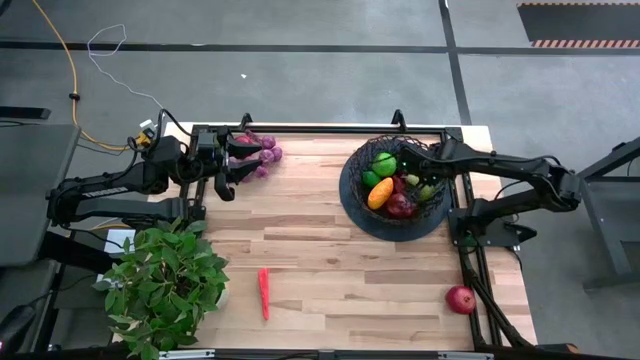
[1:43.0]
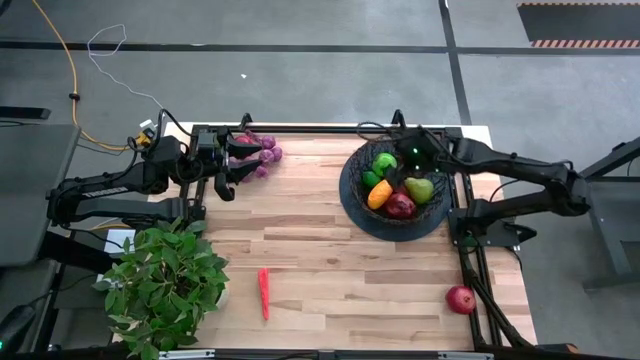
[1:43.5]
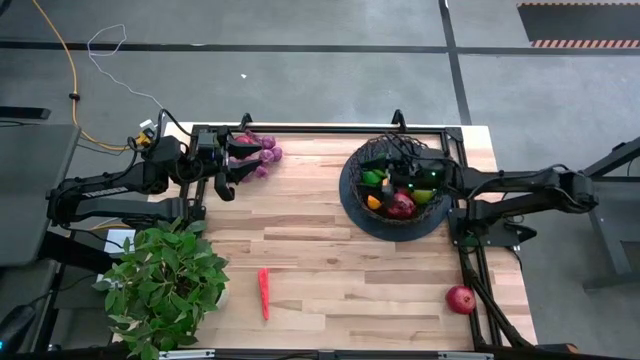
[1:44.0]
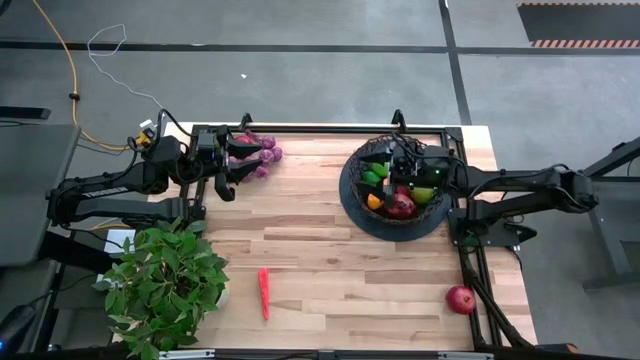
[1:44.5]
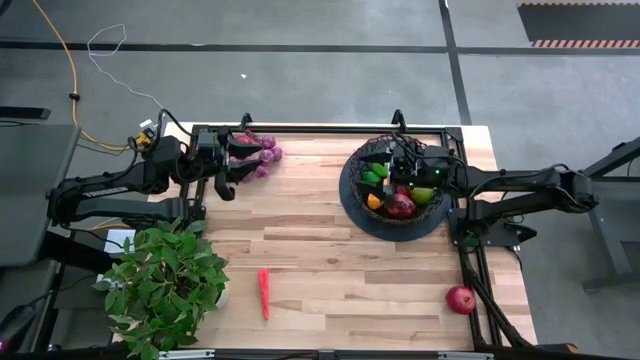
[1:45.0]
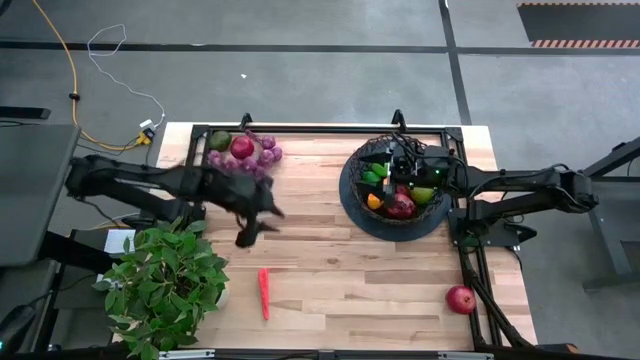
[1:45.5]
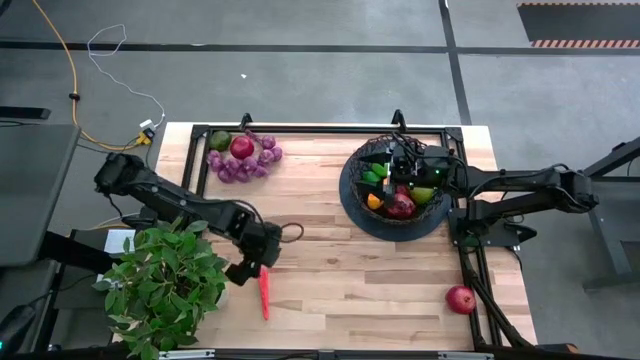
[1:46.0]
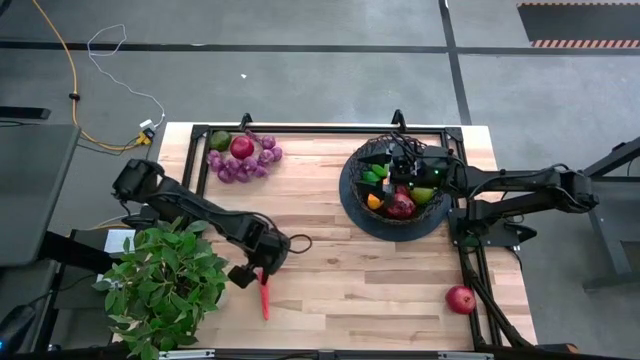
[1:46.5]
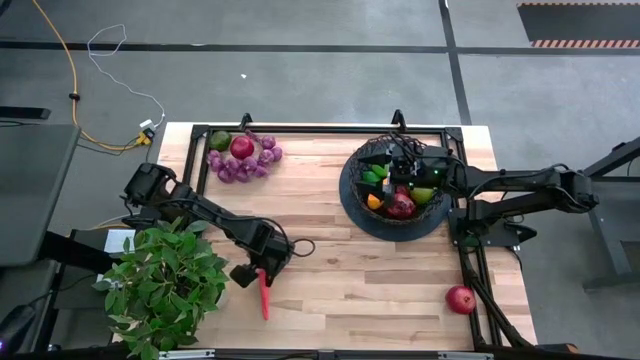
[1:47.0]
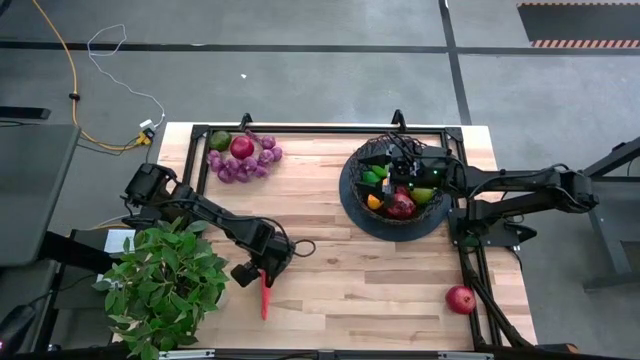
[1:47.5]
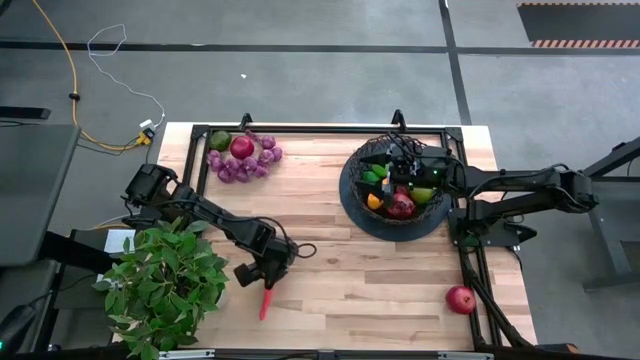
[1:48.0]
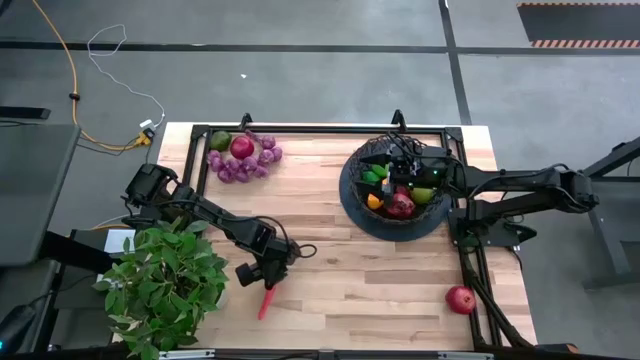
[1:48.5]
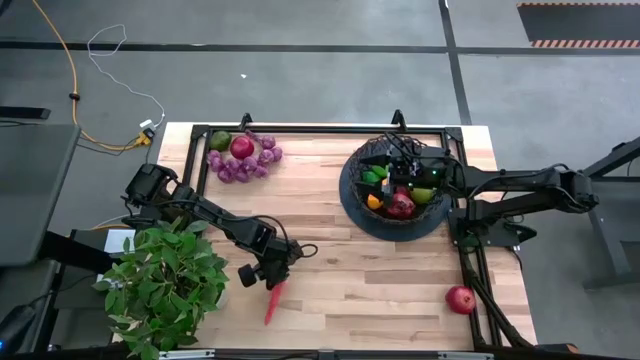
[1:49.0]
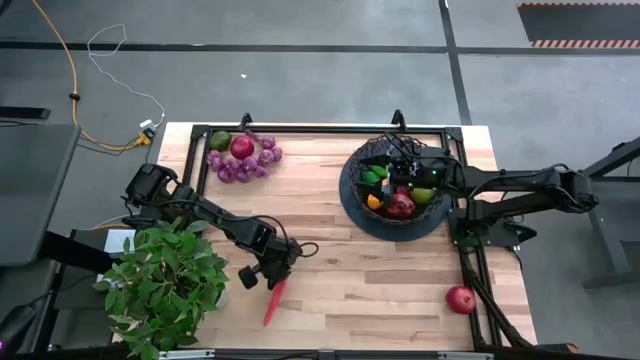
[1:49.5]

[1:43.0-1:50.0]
Task: Build produce basket
Put the orange chili pepper into the black wire basket

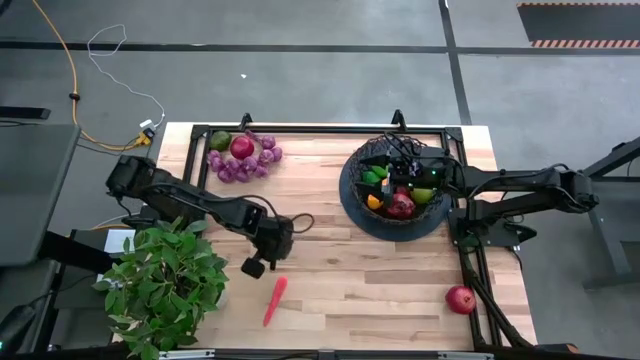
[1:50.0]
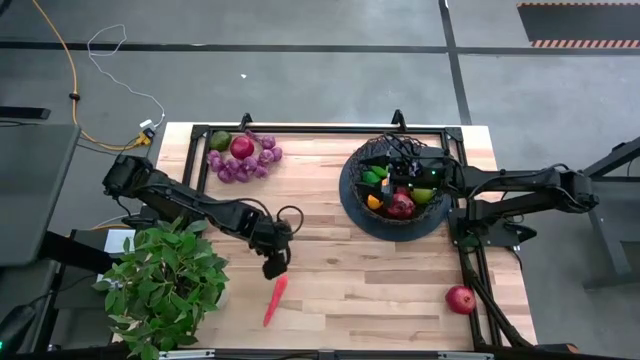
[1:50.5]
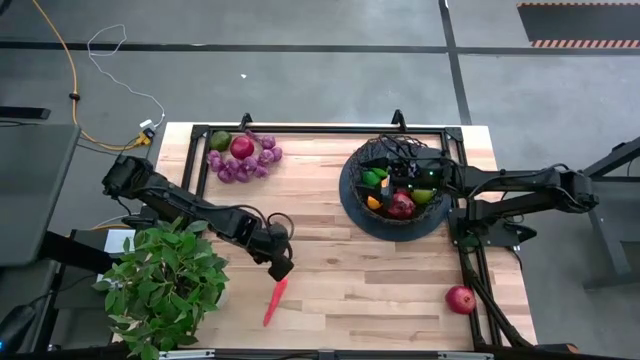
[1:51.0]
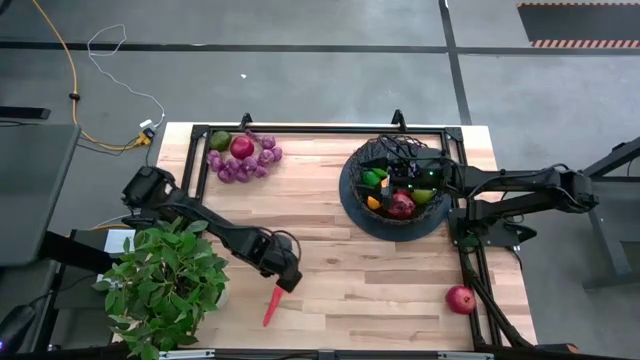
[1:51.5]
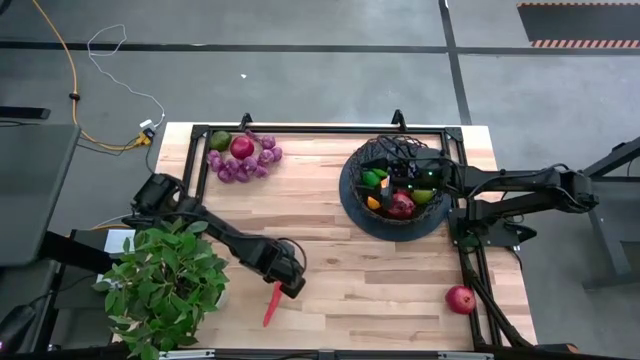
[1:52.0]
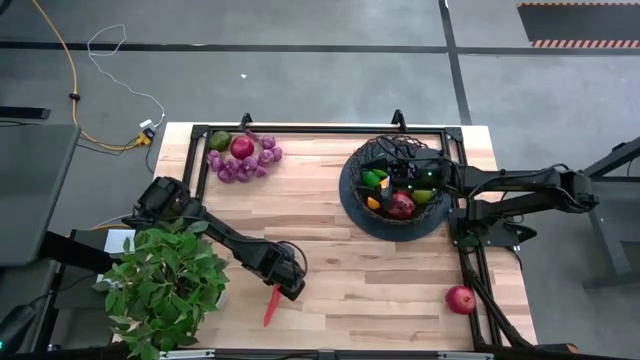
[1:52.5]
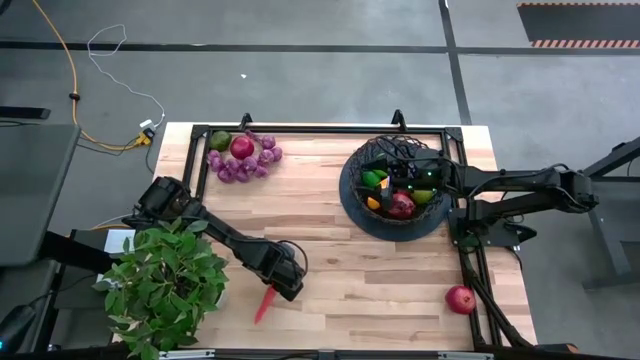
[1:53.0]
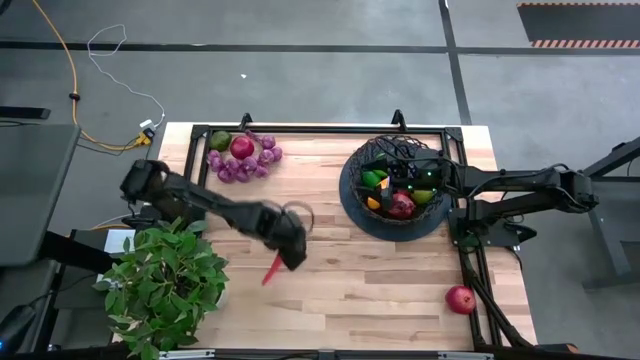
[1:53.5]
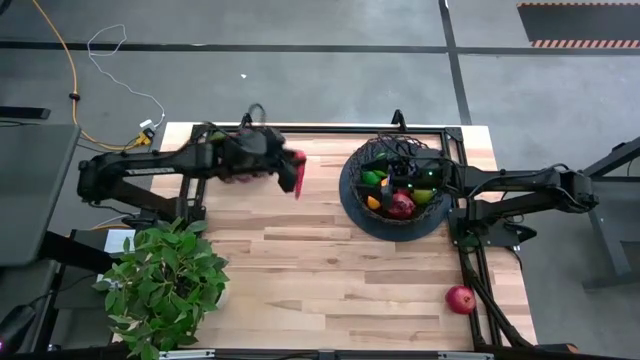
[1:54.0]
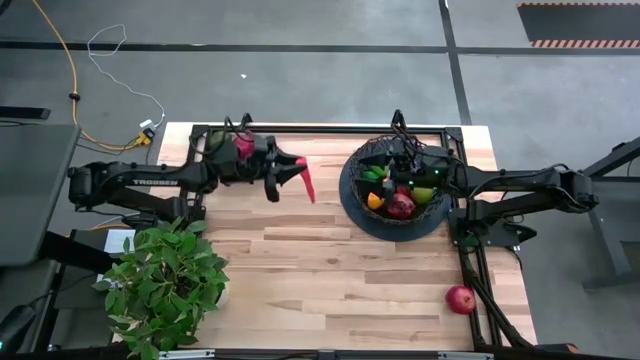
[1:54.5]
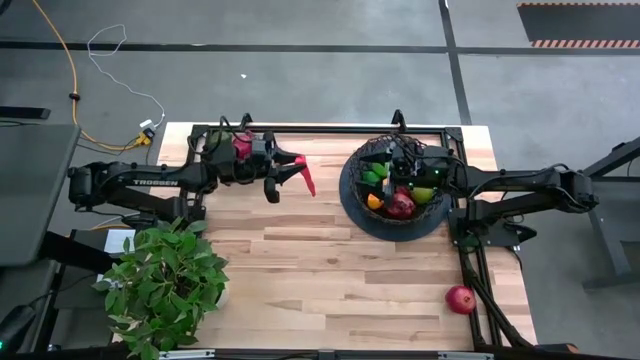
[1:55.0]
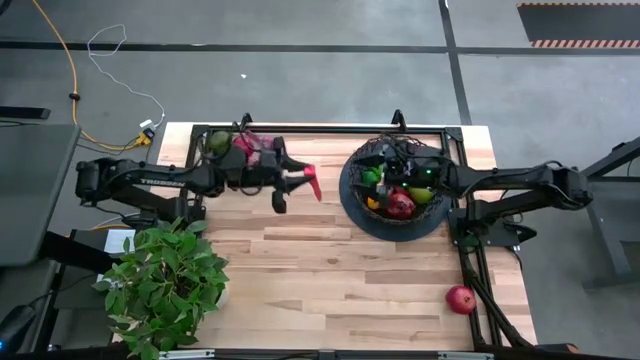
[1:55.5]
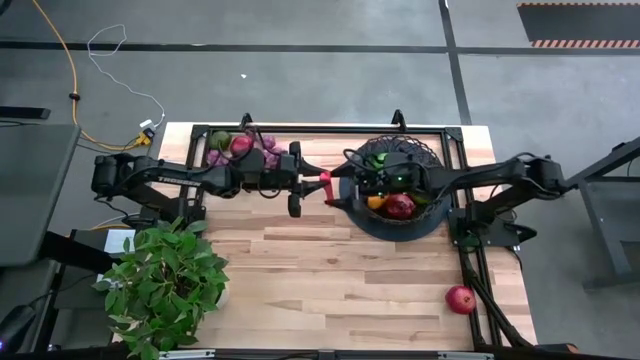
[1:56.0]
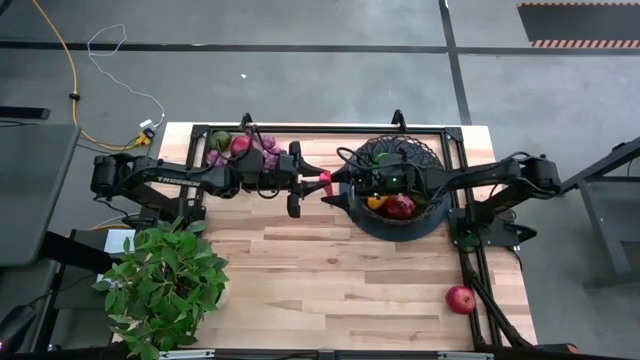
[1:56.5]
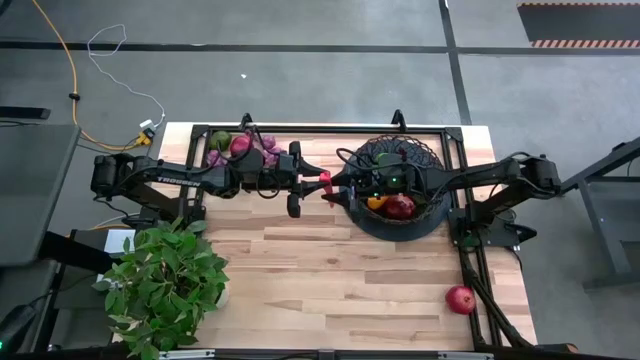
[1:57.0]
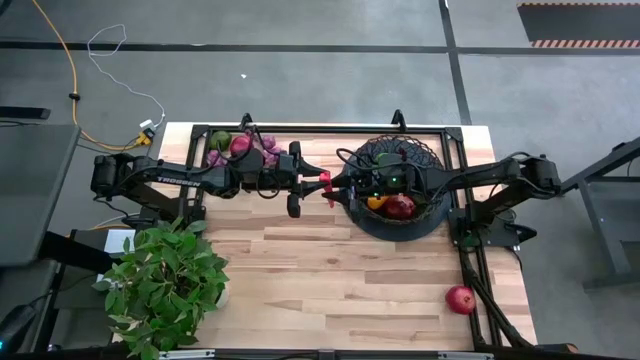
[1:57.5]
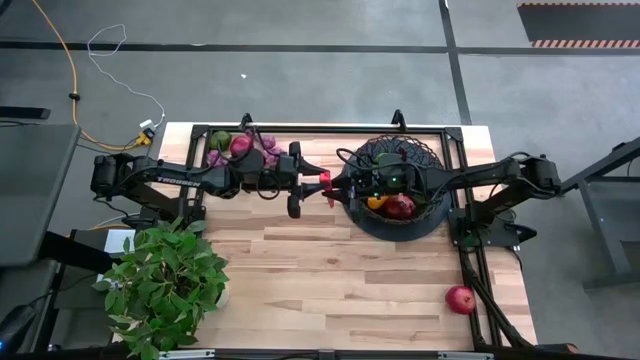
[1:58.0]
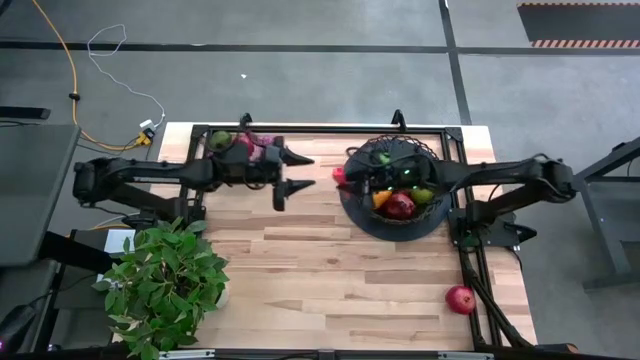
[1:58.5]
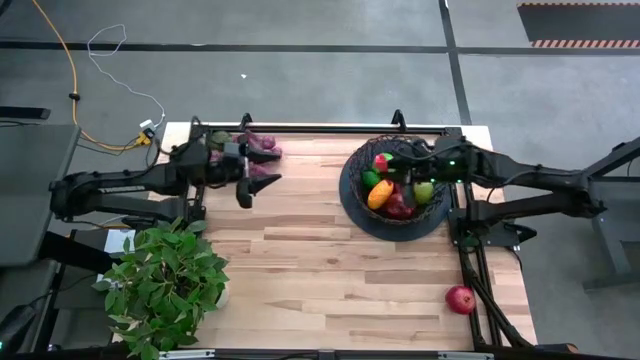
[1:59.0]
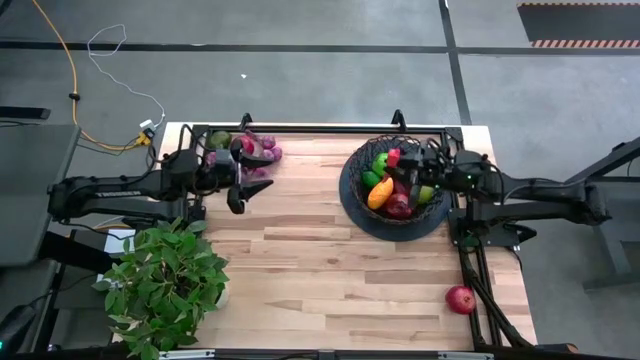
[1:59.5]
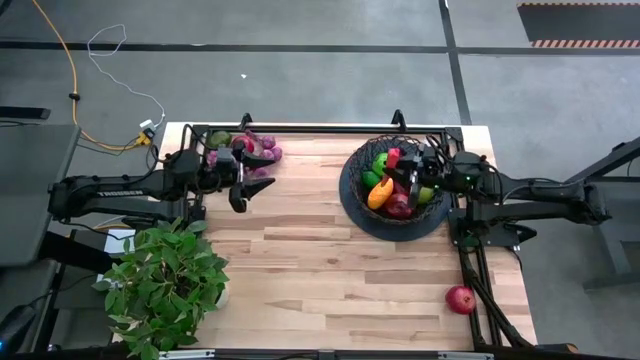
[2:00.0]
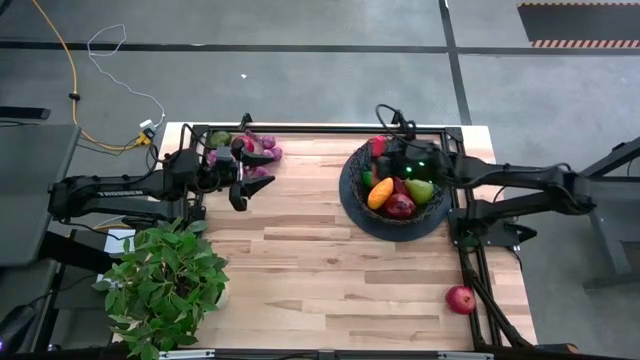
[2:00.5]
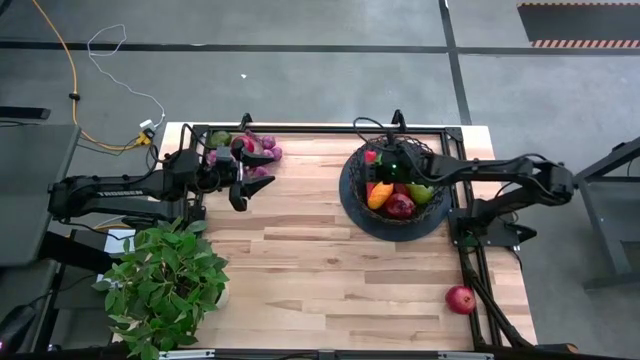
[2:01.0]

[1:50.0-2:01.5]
Put the orange chili pepper into the black wire basket

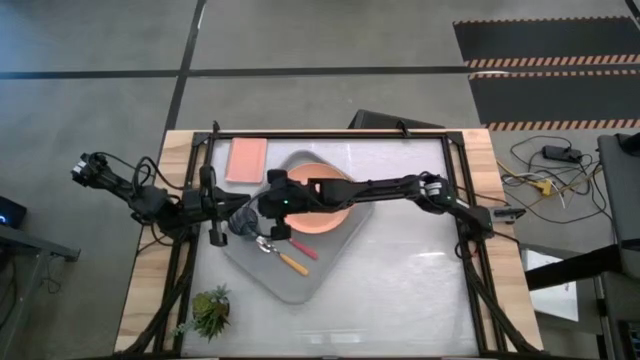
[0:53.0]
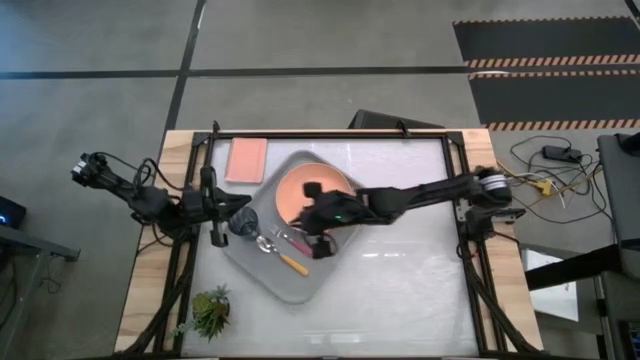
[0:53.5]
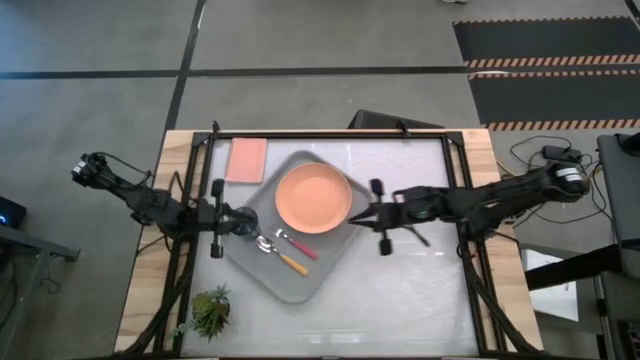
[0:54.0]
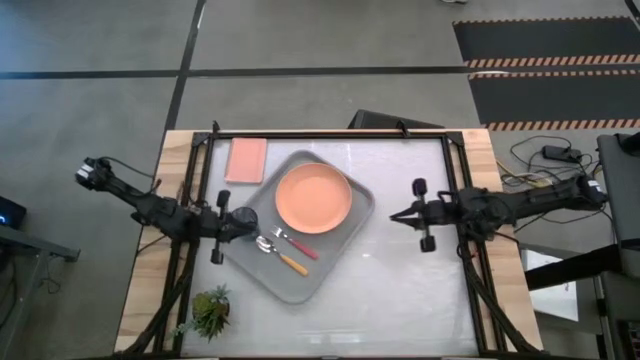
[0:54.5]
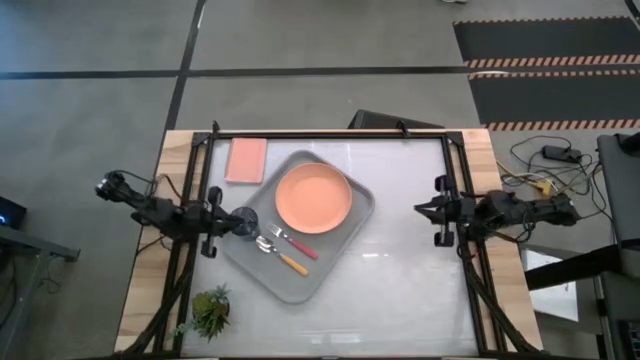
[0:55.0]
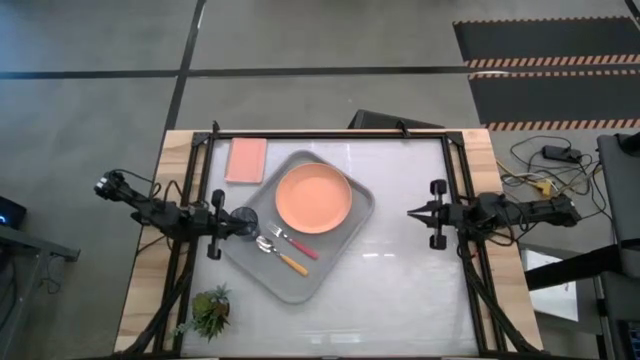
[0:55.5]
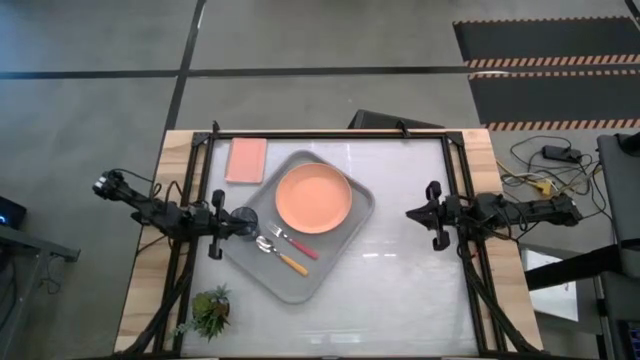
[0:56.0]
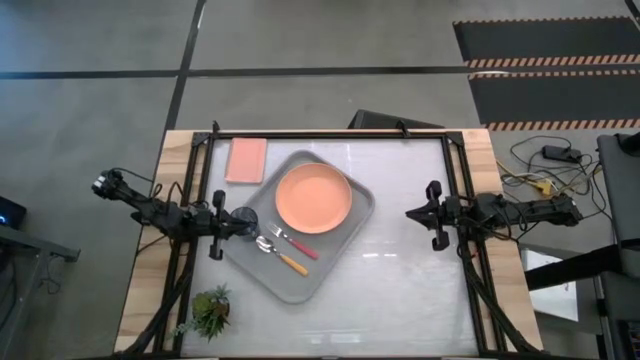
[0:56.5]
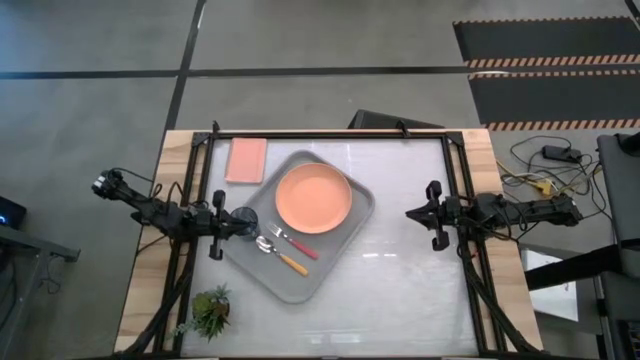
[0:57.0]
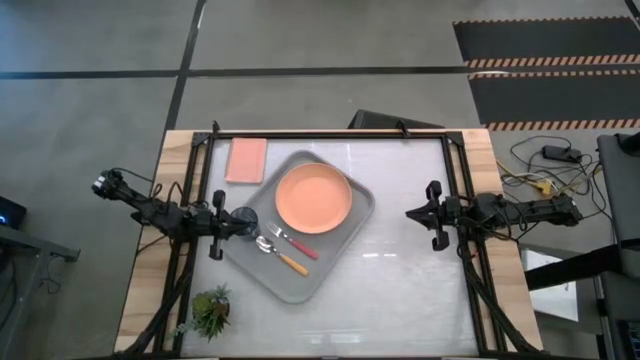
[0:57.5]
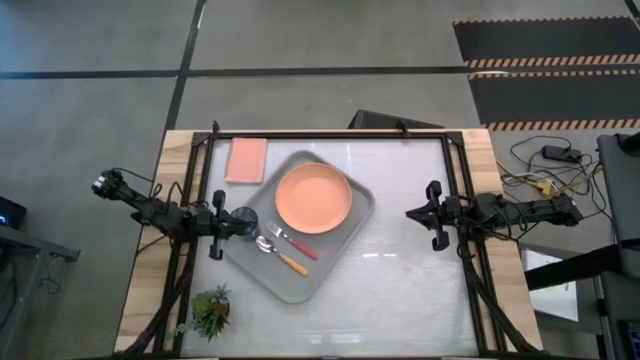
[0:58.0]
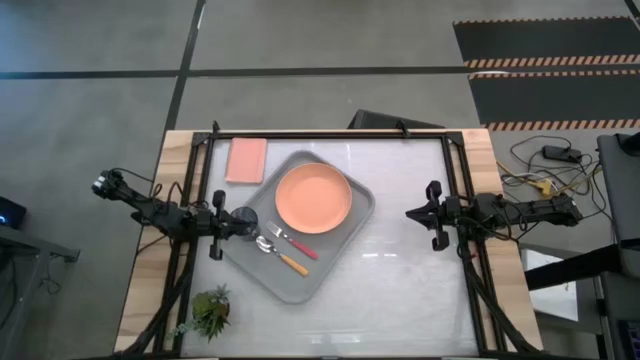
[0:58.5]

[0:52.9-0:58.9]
Task: Pick and place plate/cup/fork/spoon on tray
Return to Home Position
